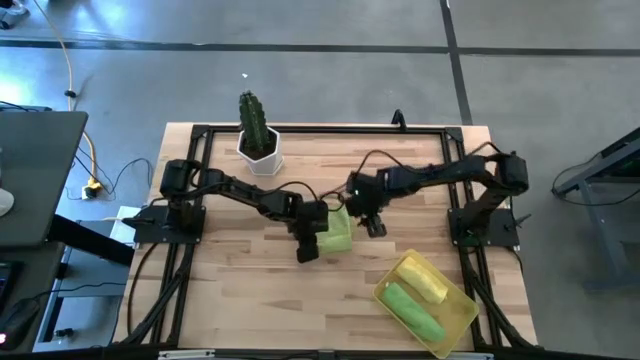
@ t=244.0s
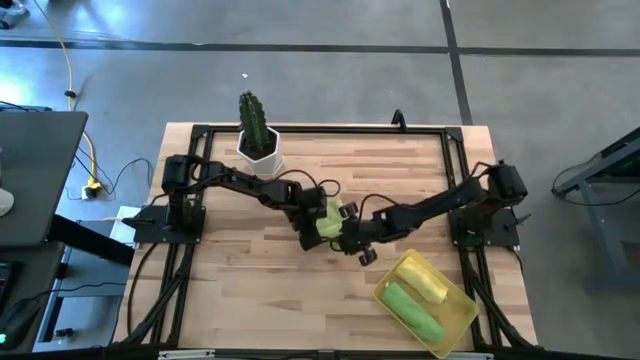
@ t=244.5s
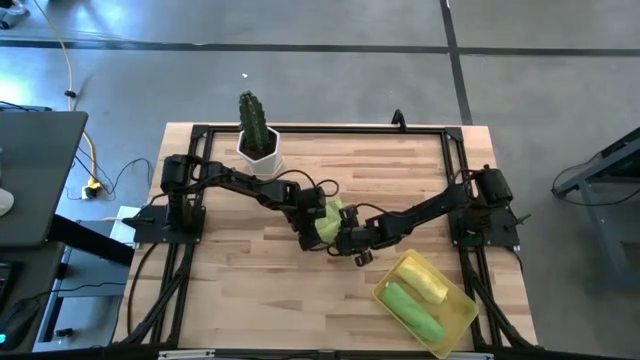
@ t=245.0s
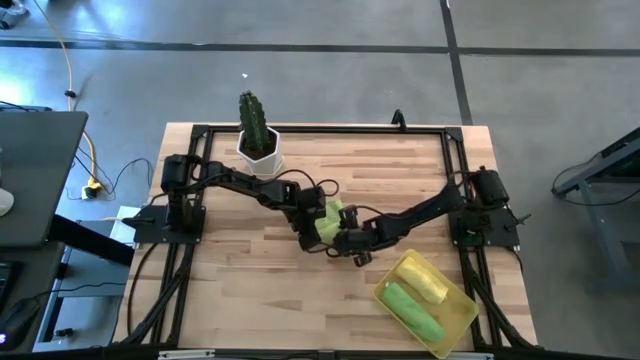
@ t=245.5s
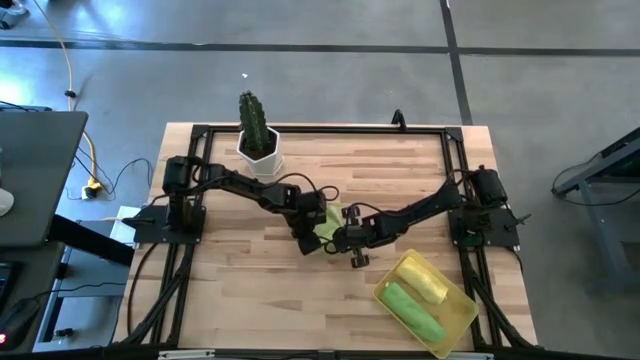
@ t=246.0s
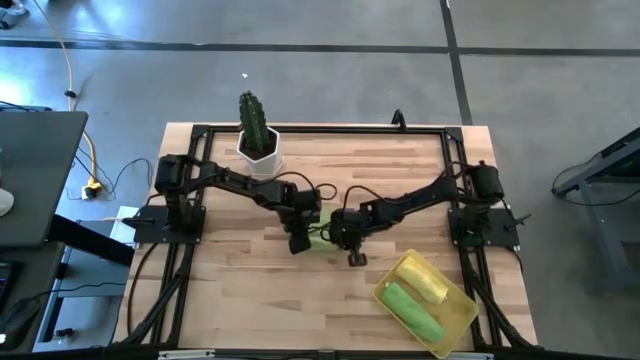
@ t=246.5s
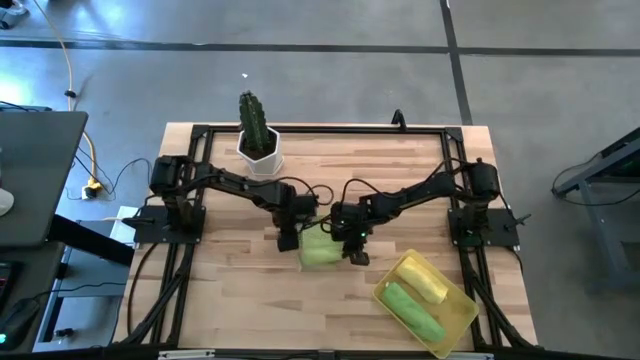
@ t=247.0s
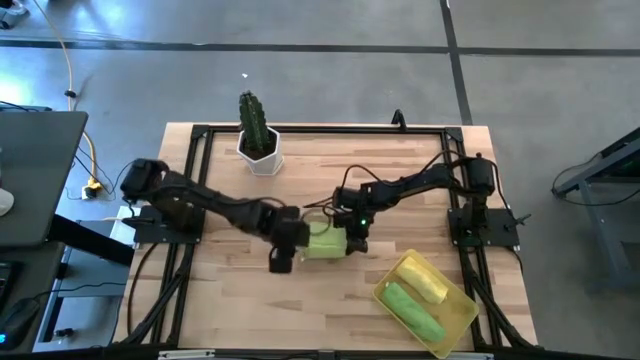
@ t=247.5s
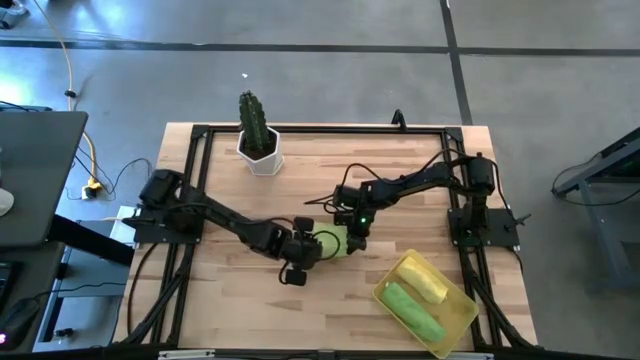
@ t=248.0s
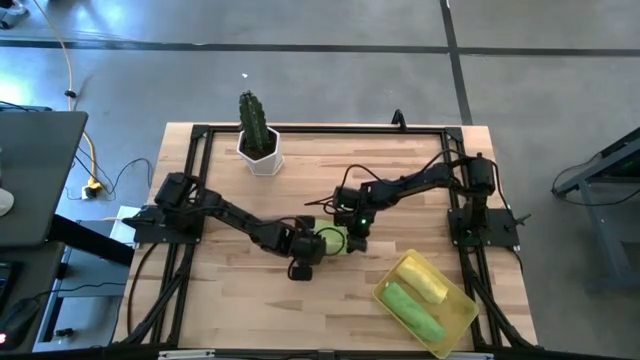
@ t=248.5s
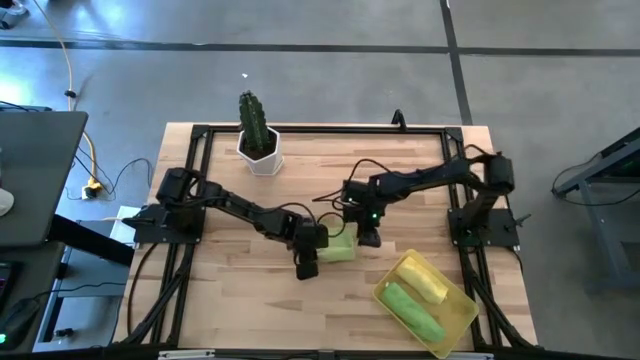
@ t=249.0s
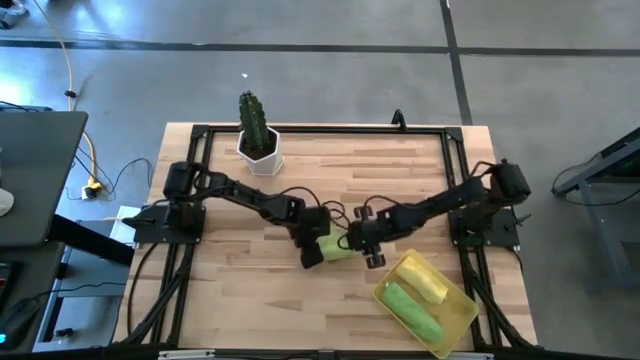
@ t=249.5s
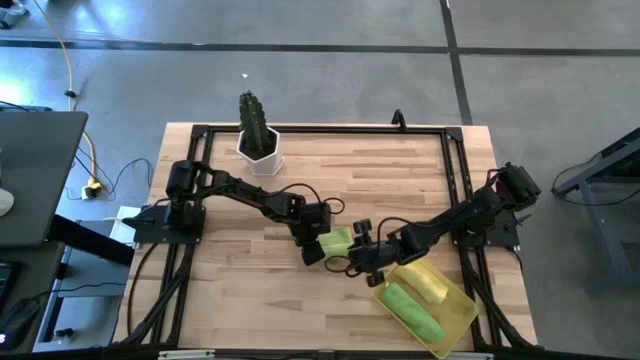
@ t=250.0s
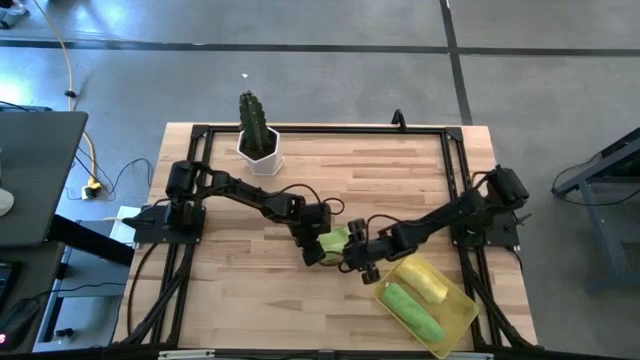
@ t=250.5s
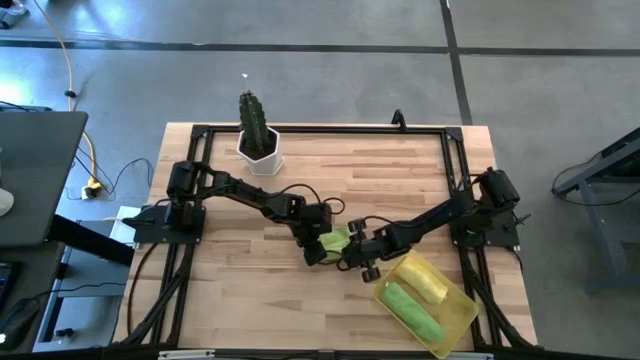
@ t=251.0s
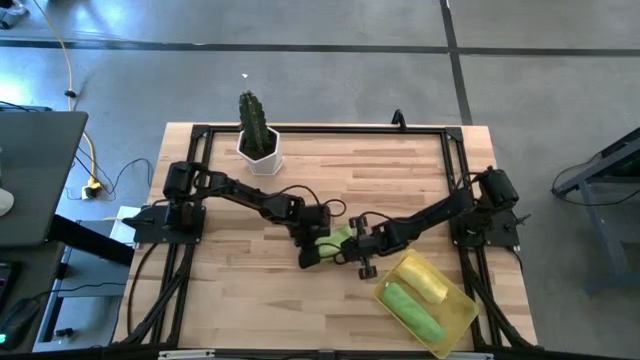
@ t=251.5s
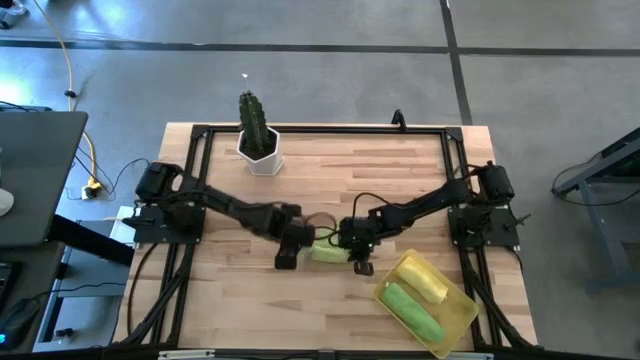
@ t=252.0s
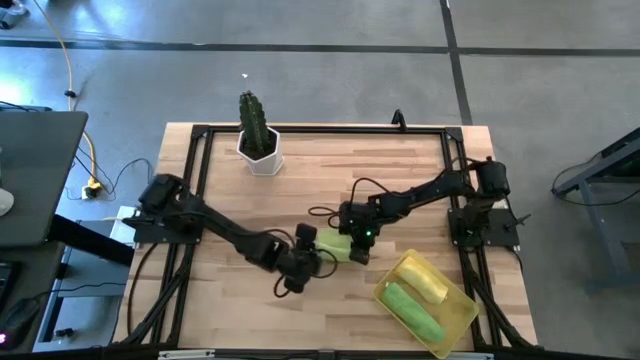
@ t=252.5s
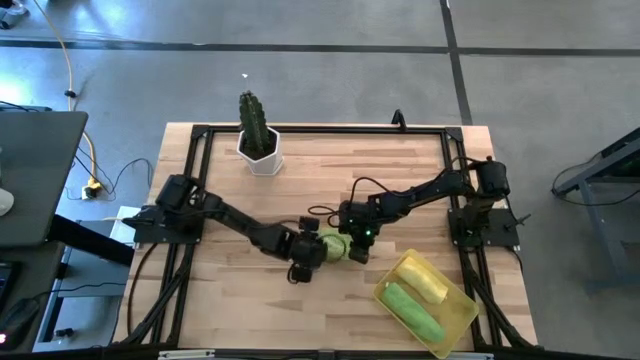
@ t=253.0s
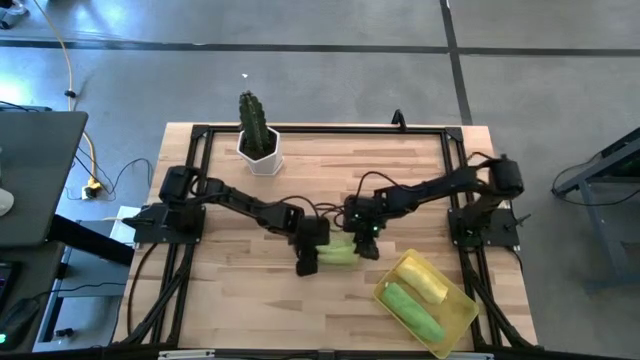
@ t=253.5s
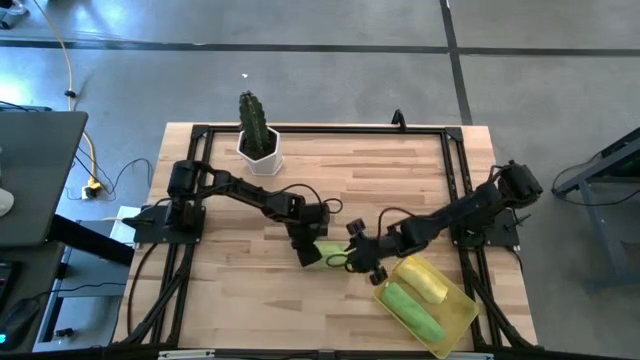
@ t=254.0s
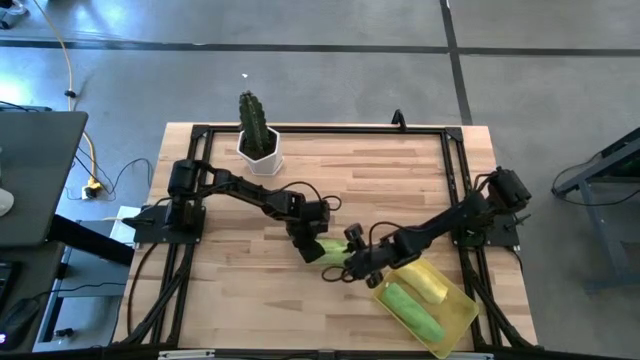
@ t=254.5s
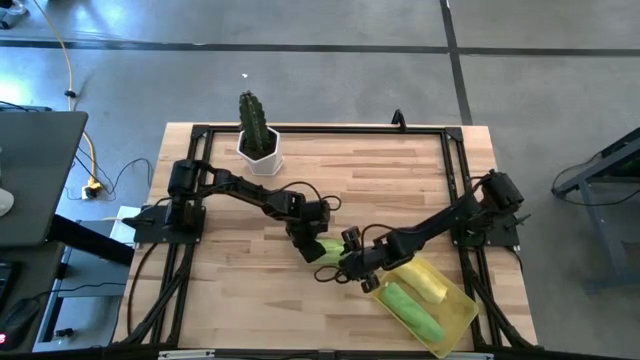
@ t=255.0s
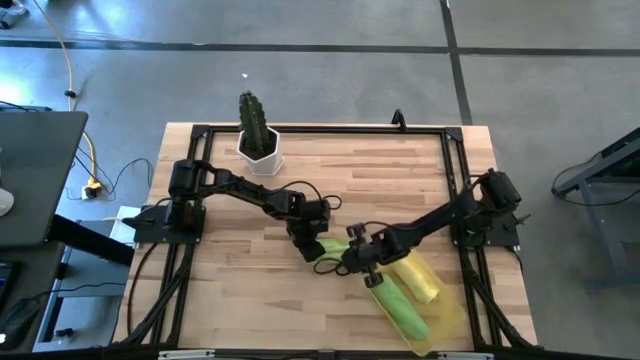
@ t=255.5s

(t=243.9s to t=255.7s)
Task: Roll microfiber towels into tight, uniform cylinder then place into a basket
Roll the light green towel

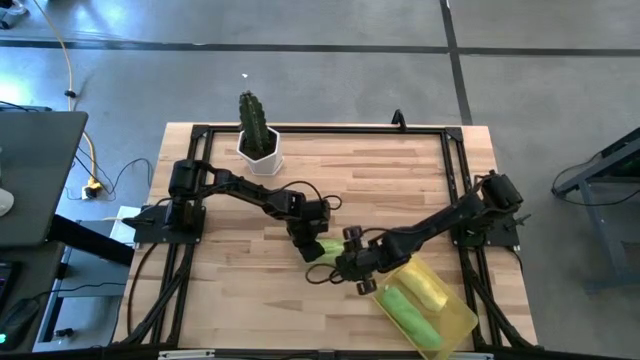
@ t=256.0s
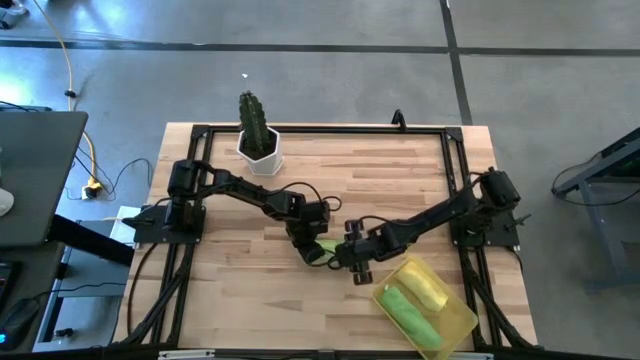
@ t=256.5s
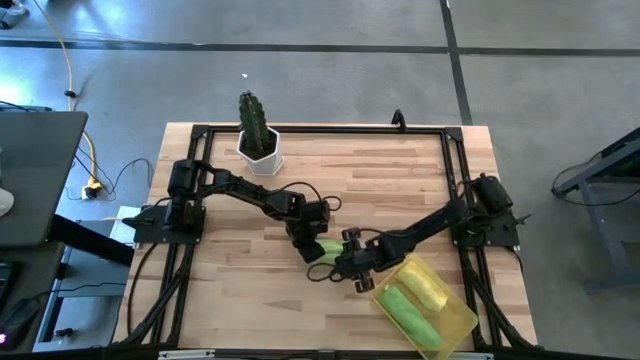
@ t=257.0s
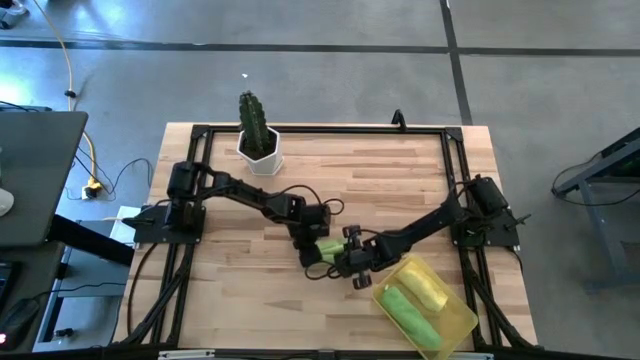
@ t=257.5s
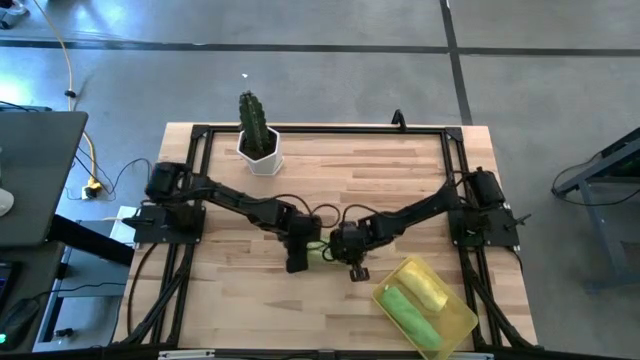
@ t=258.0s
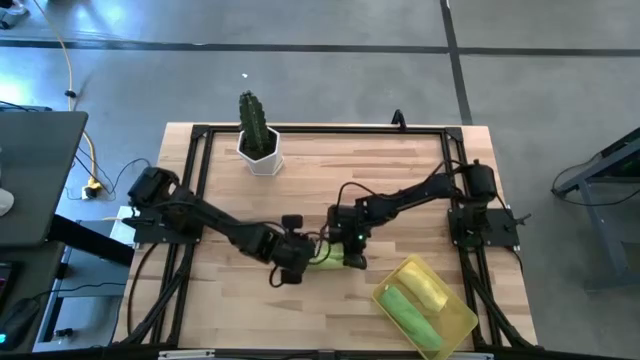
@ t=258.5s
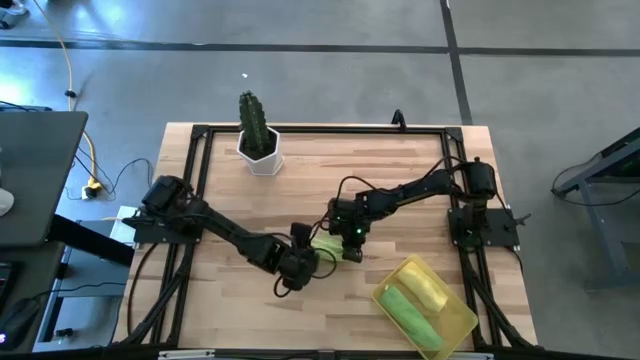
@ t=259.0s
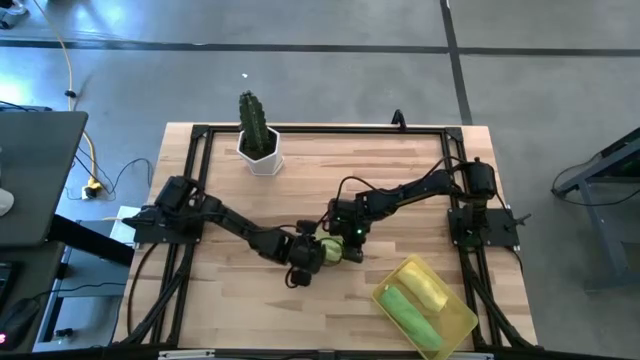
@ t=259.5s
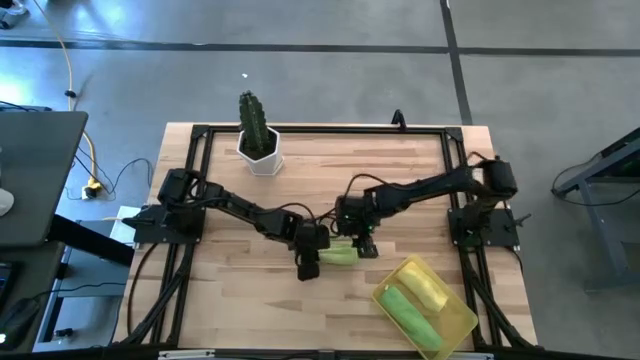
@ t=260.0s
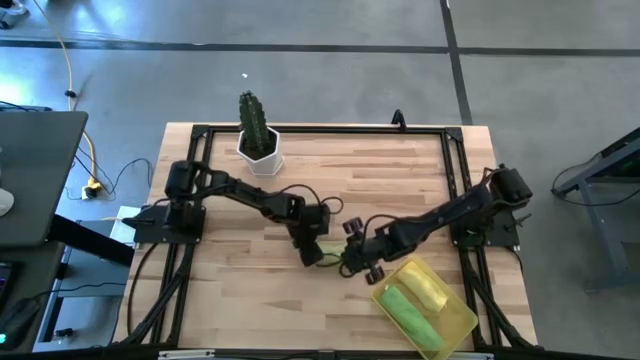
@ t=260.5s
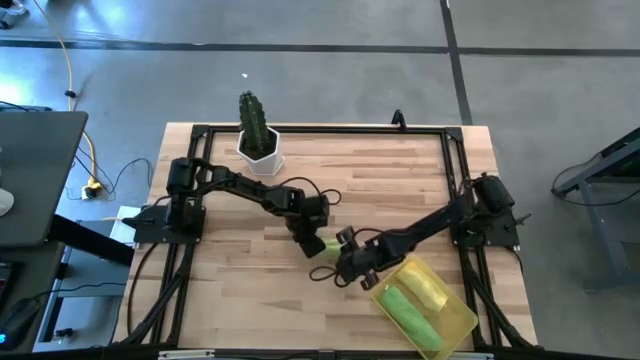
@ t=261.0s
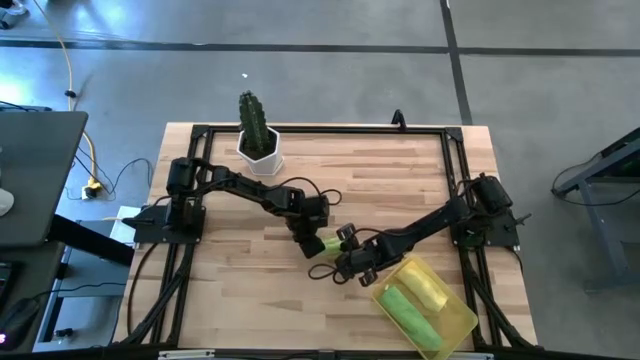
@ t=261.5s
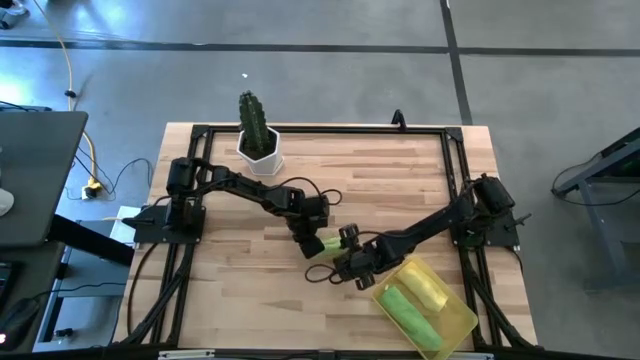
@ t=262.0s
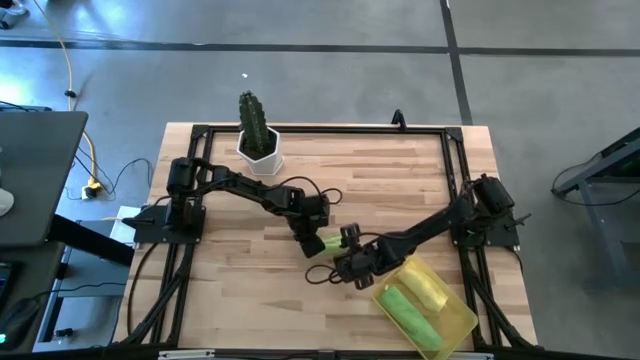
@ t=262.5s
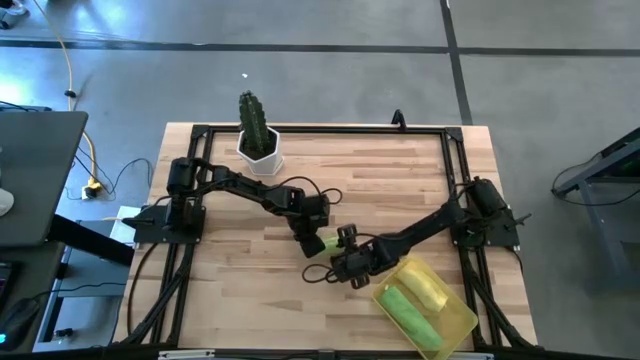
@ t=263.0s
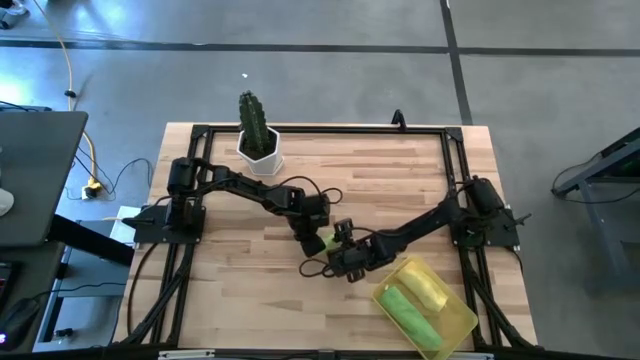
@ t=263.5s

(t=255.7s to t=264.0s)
Roll the light green towel

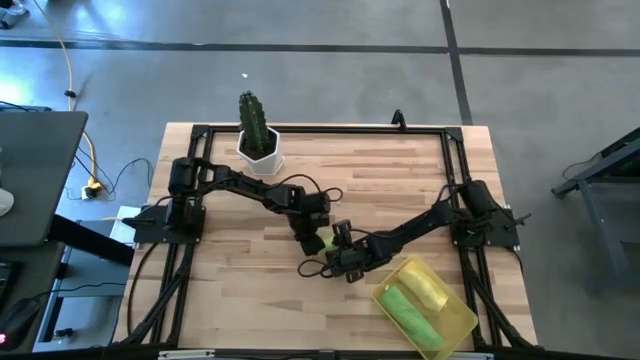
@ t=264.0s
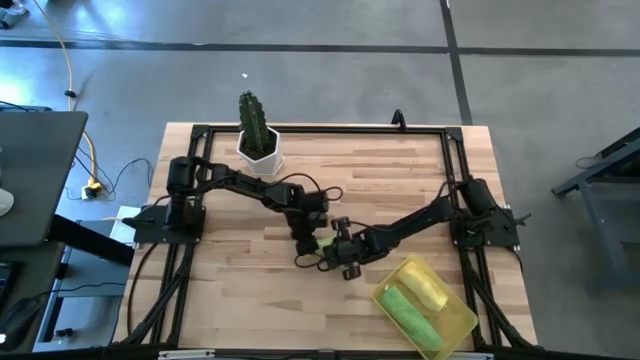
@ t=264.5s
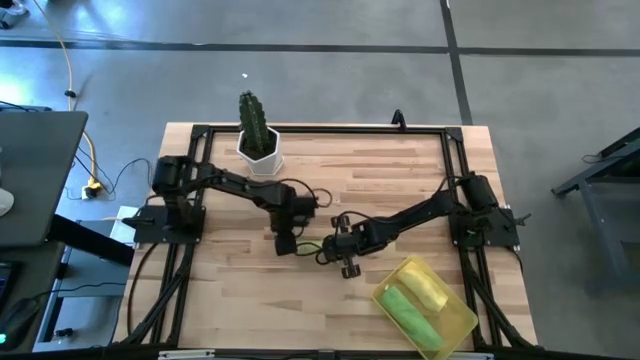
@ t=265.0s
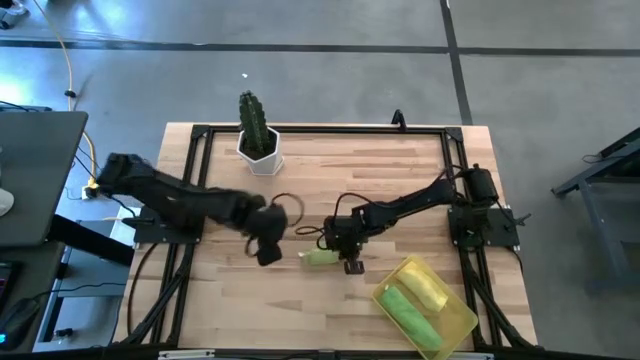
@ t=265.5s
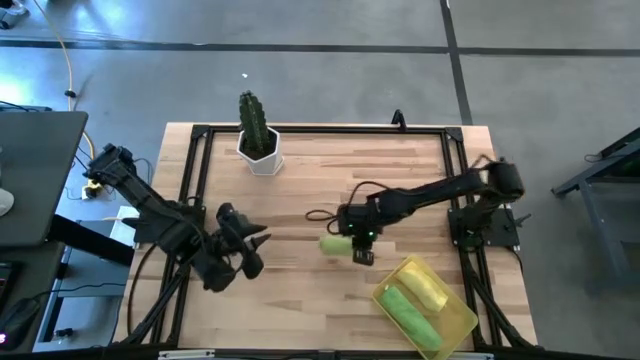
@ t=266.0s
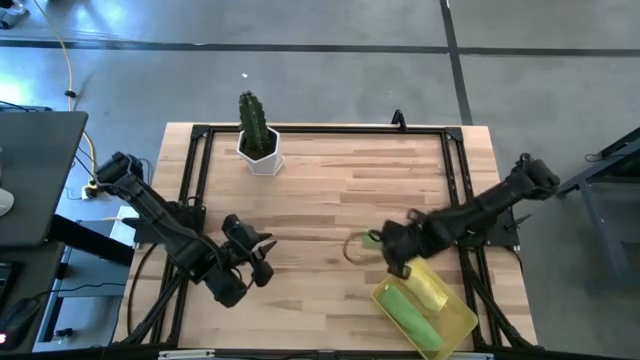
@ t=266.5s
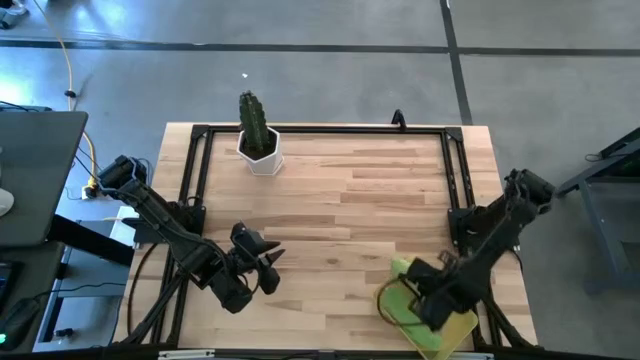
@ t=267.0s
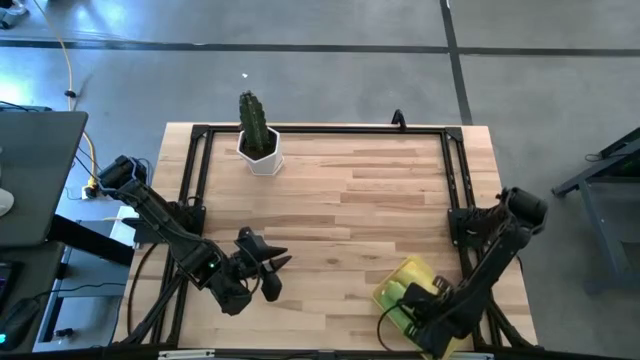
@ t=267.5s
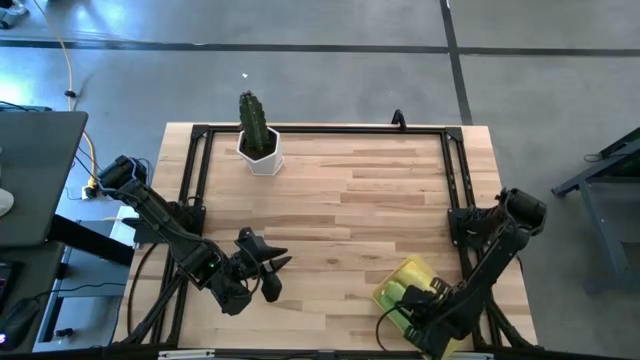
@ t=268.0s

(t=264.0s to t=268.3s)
Put the rolled light green towel into the yellow bin
